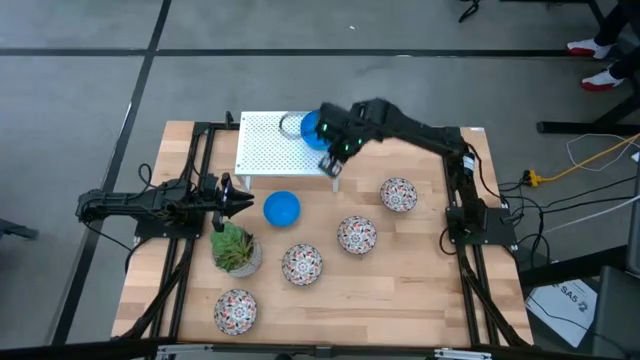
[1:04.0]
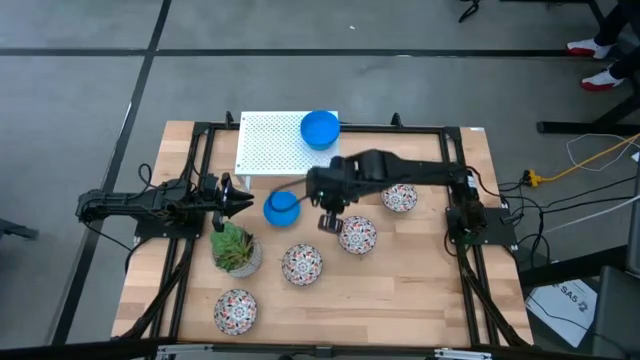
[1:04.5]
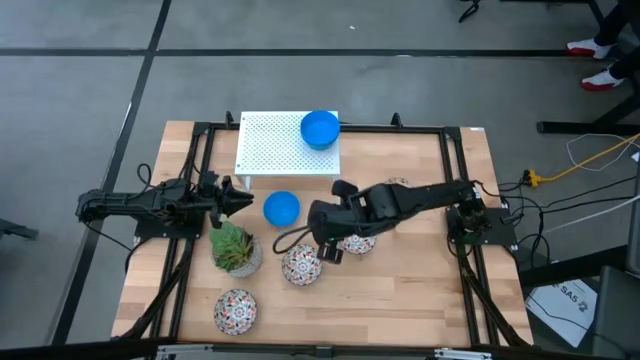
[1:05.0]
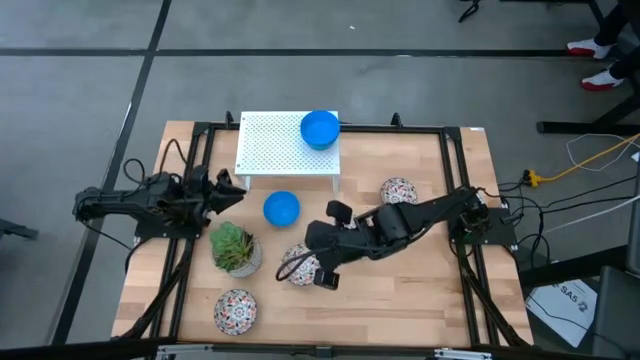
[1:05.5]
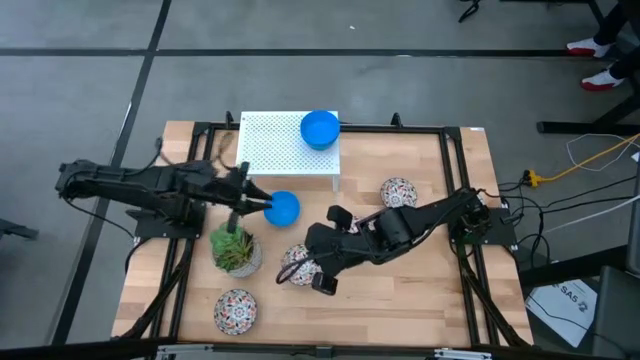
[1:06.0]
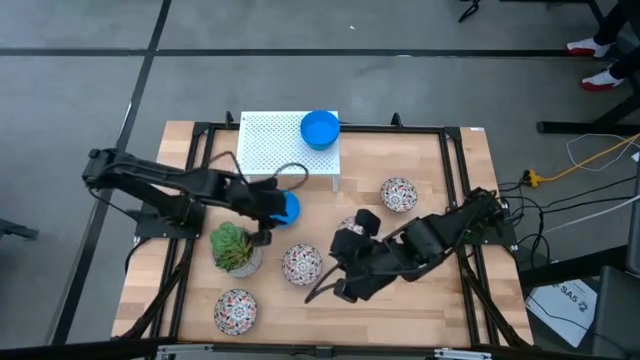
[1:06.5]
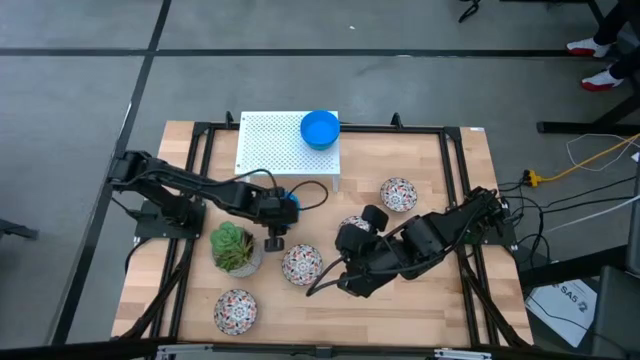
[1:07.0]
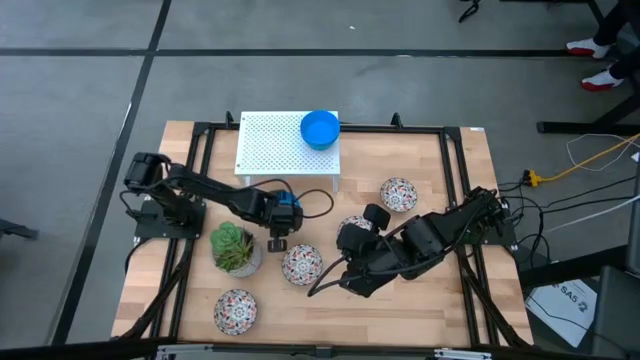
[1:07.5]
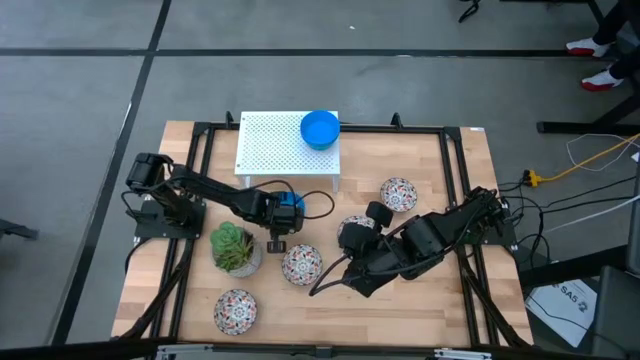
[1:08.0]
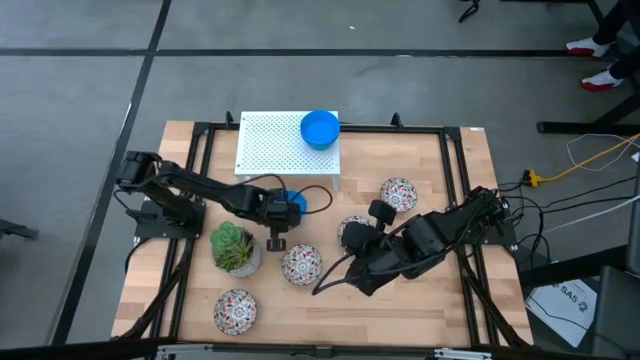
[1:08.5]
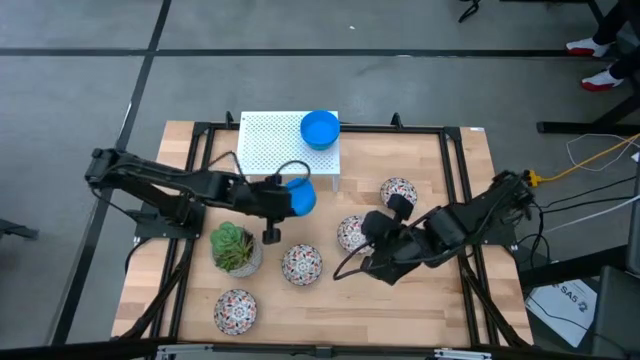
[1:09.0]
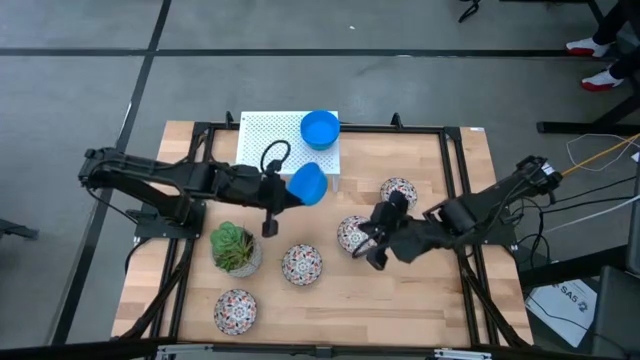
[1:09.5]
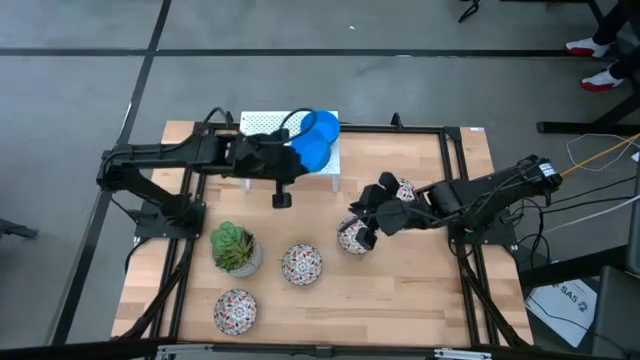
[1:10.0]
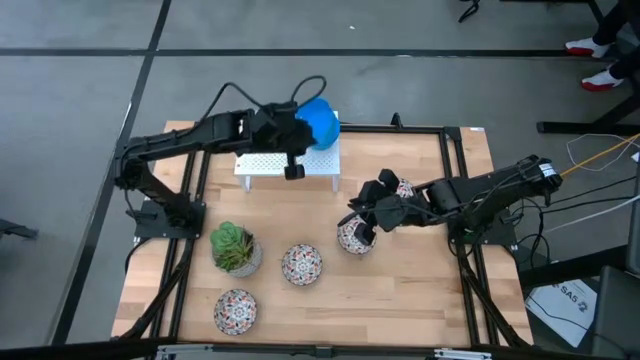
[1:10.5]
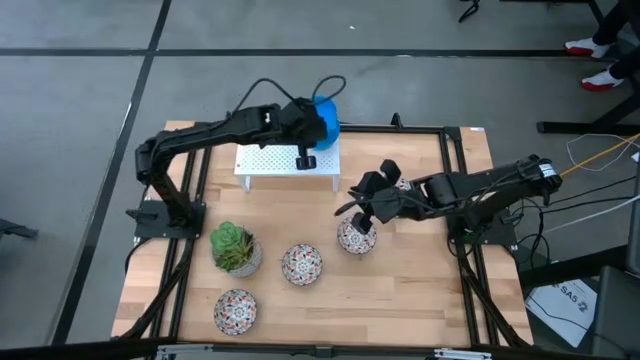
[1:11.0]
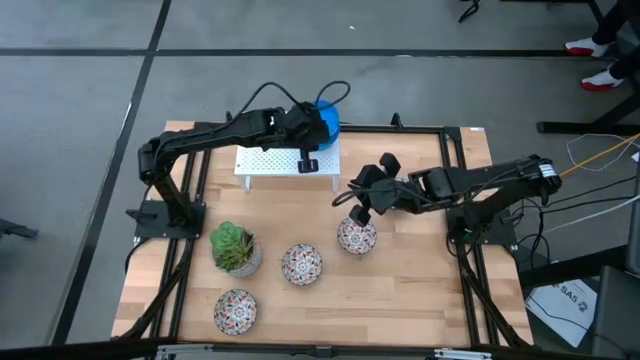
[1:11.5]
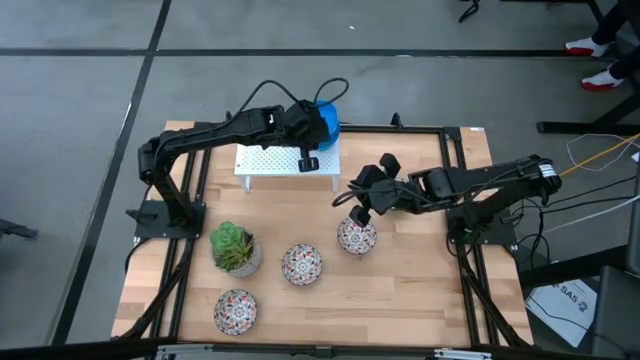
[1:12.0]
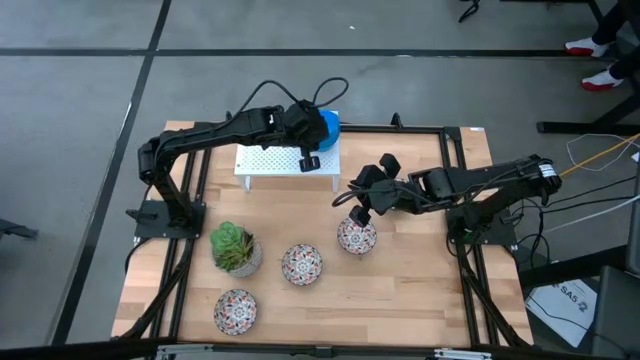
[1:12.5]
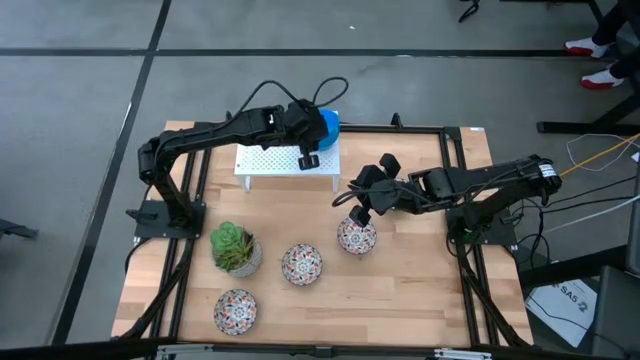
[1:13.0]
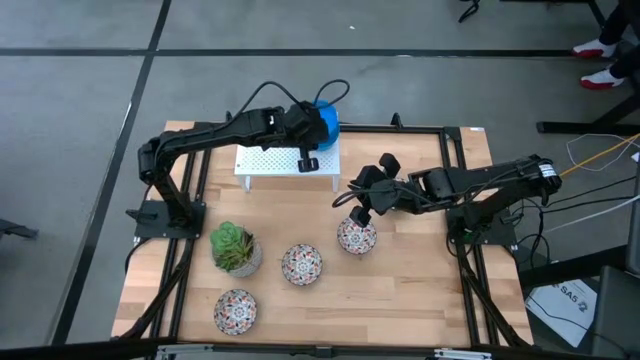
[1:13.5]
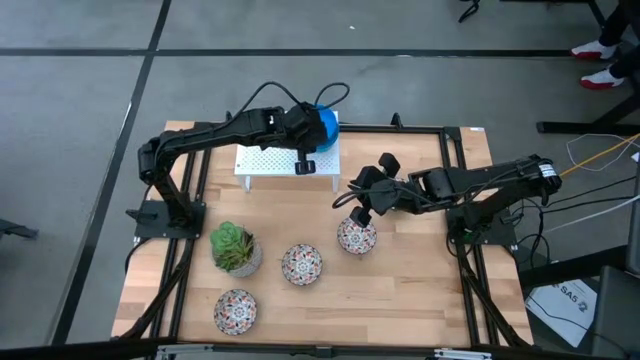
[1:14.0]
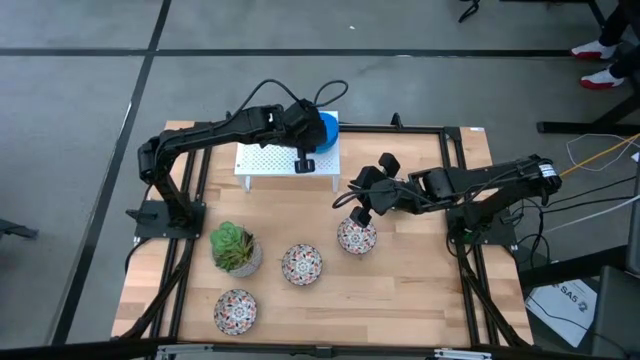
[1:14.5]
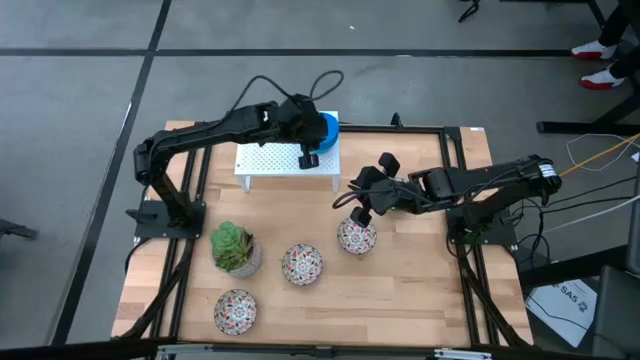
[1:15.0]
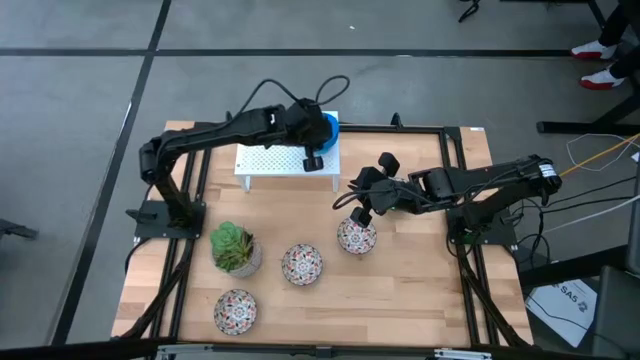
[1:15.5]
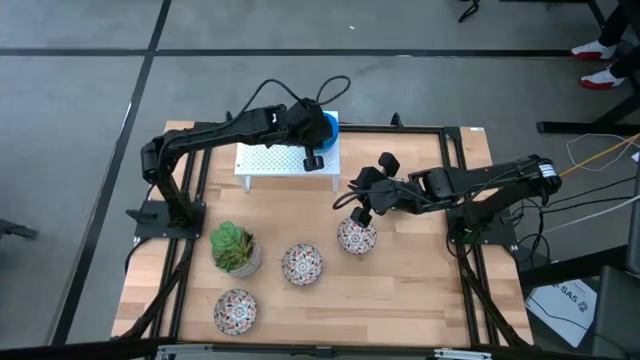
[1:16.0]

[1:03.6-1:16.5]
Task: Pick & Place Mini bowls
Stack the blue bowl on the blue bowl on the shelf
